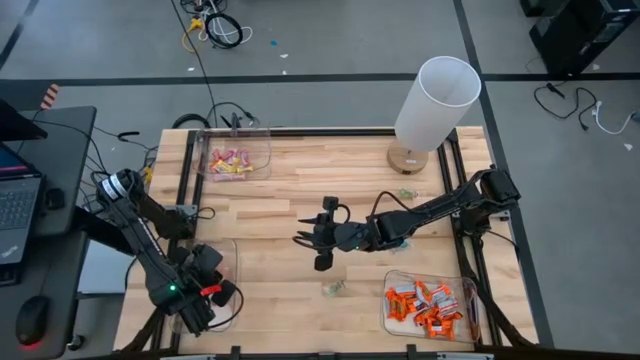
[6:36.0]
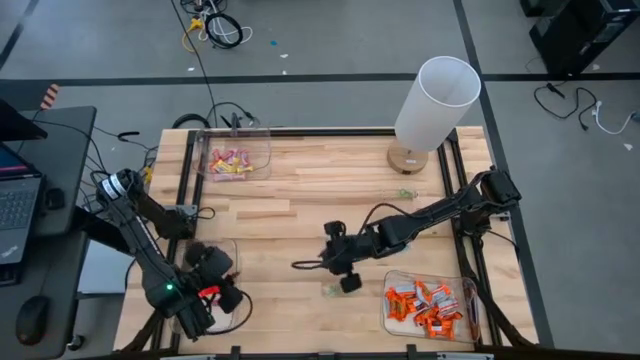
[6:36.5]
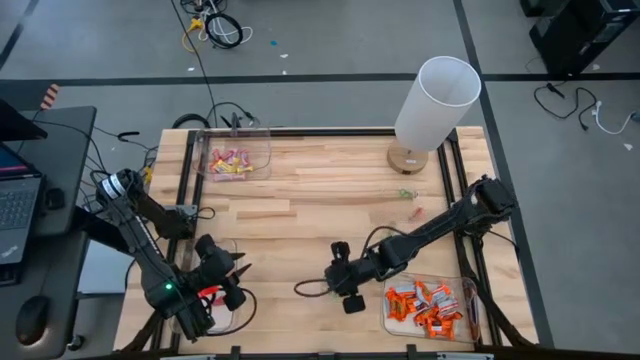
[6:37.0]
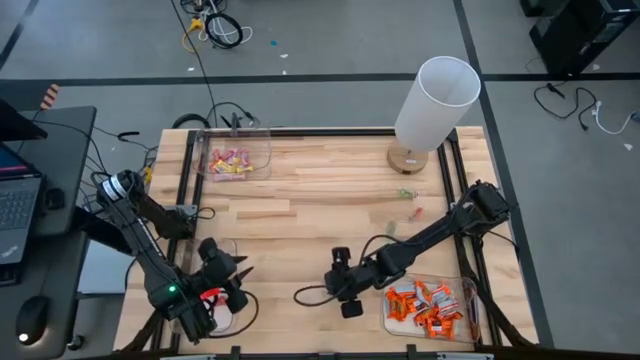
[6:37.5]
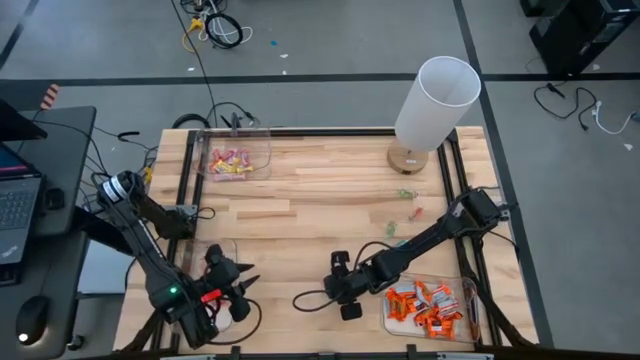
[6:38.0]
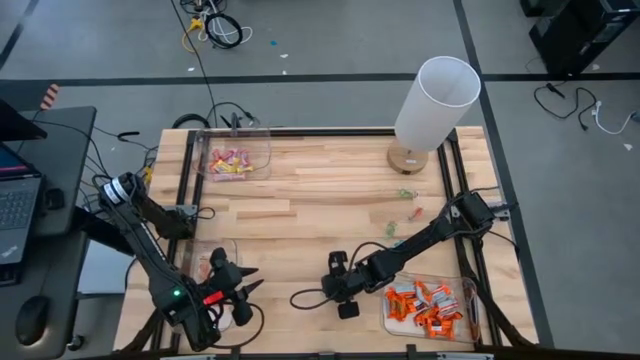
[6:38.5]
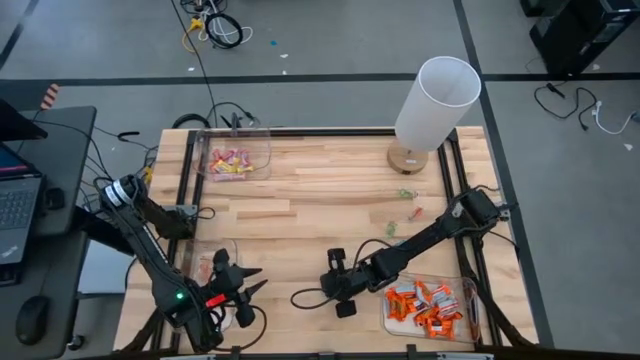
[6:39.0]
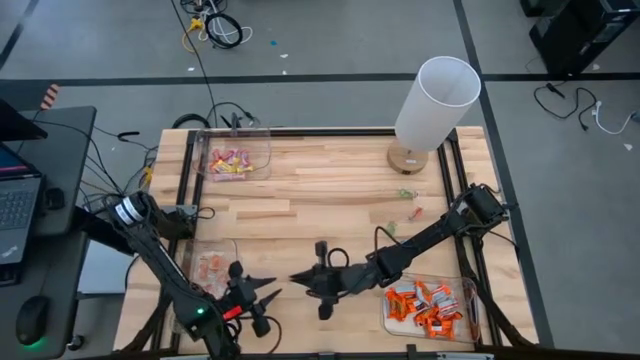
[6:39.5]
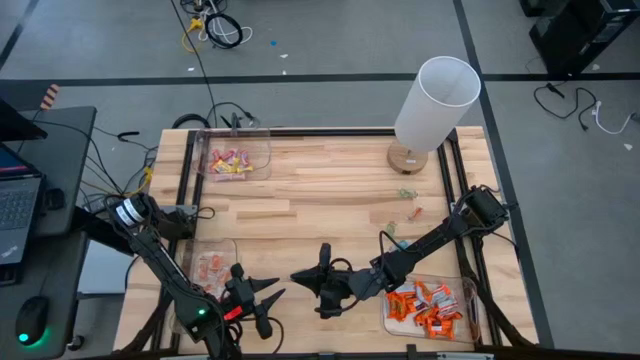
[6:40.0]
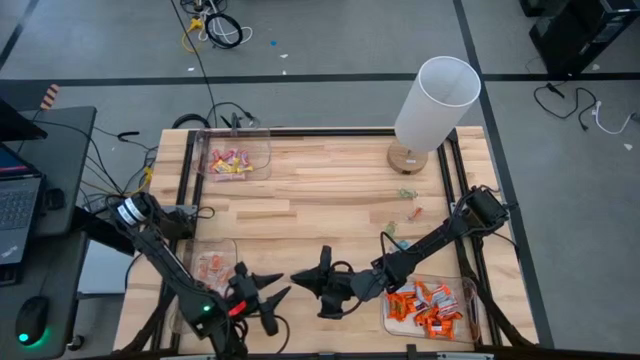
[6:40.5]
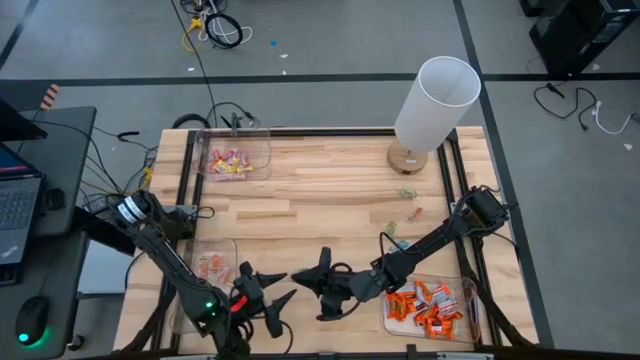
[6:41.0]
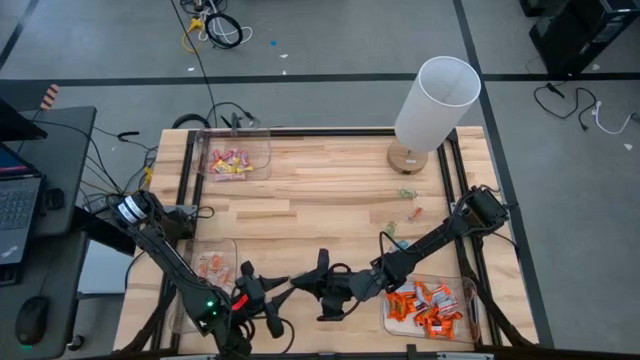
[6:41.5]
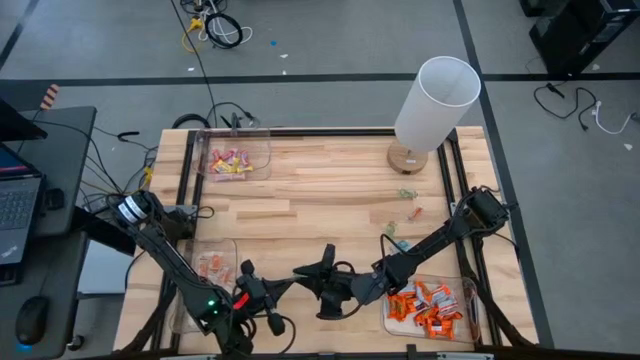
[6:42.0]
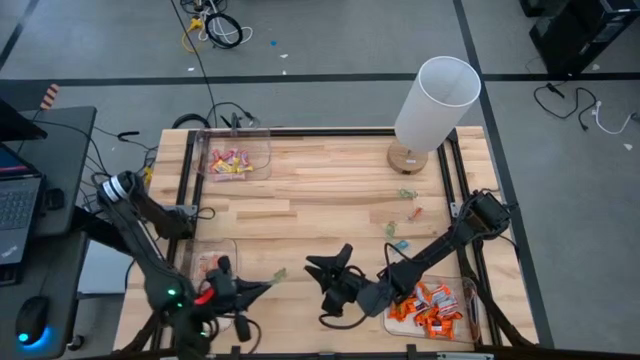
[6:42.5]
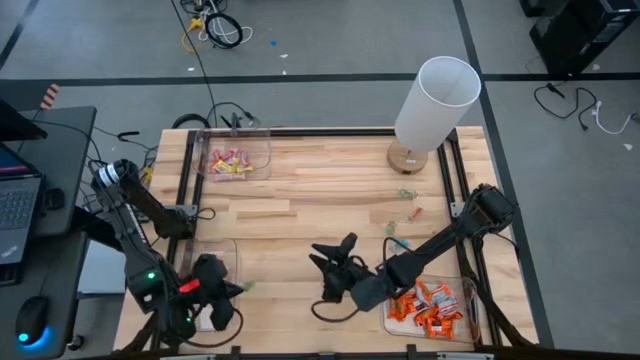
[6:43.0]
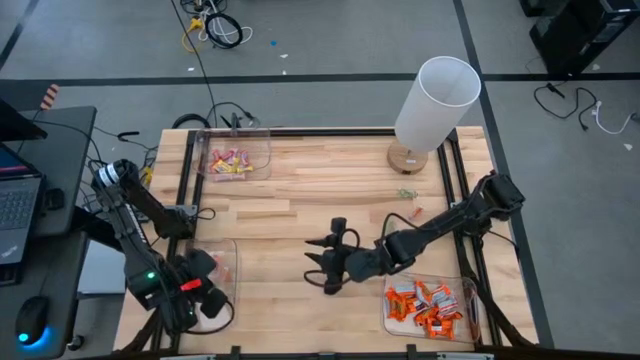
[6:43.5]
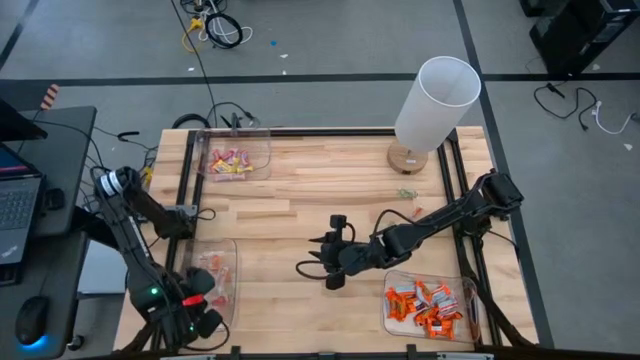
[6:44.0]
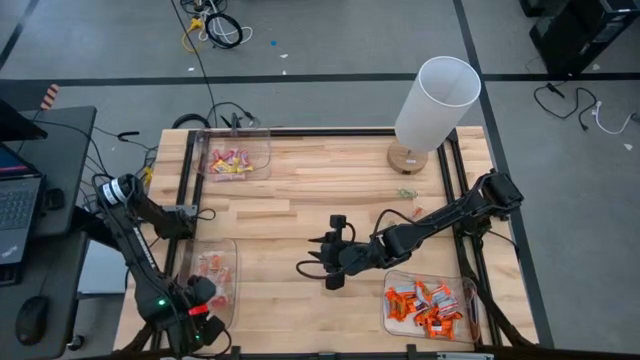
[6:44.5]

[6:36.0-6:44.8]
Task: Sort candy
Put the green gummy into the bottom left transparent bin

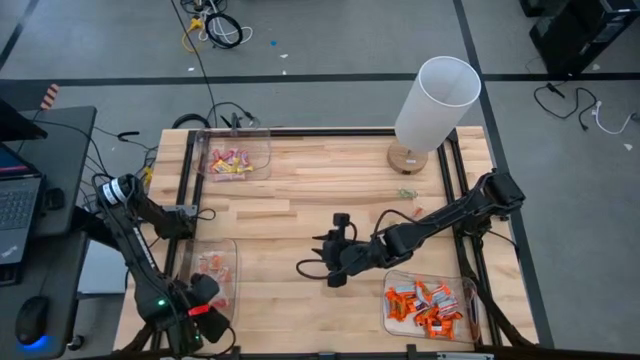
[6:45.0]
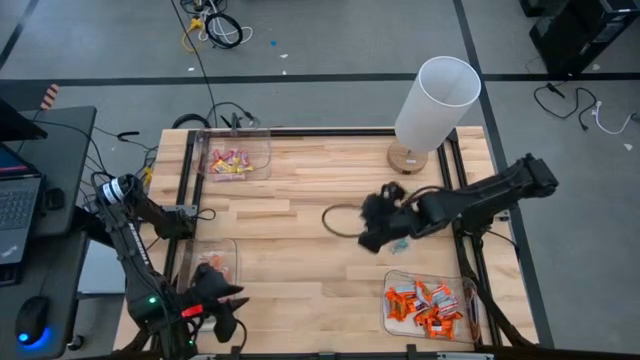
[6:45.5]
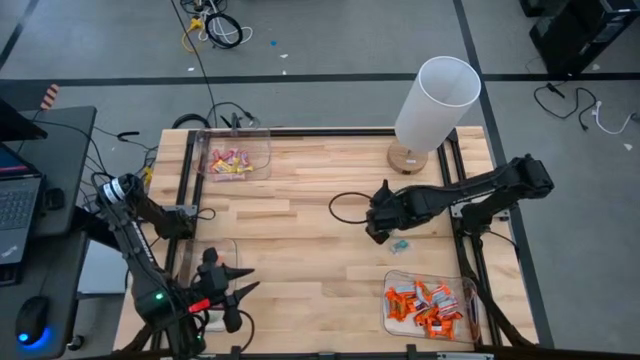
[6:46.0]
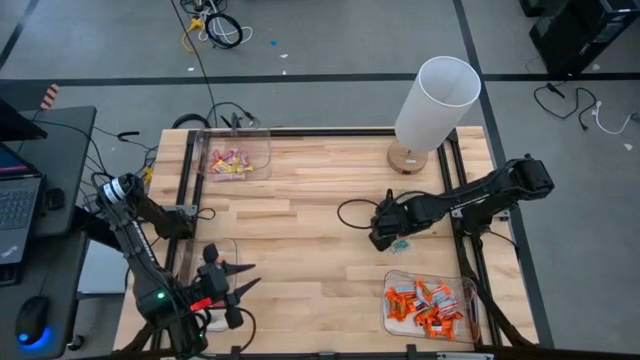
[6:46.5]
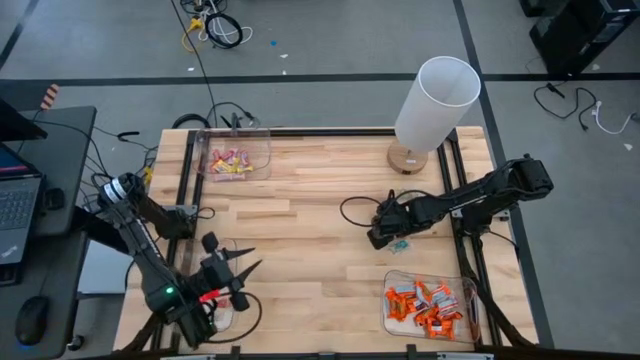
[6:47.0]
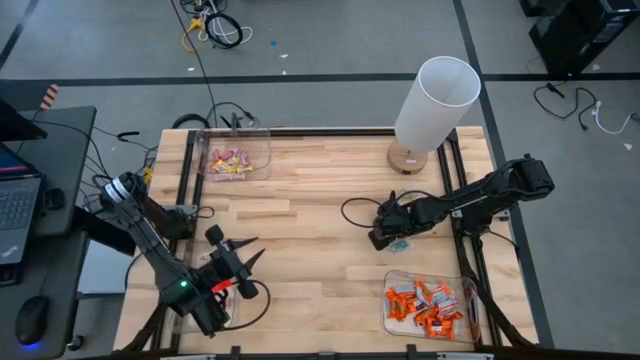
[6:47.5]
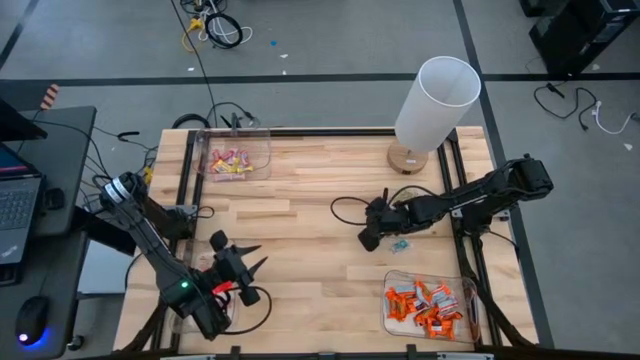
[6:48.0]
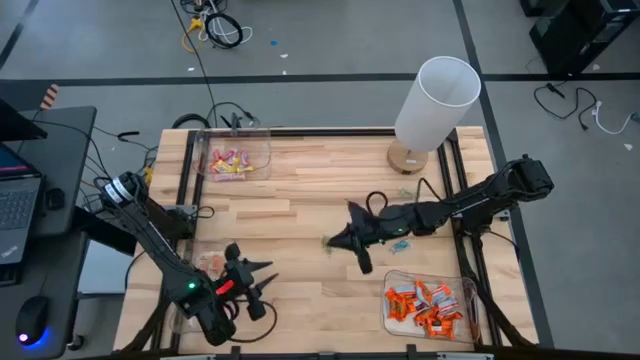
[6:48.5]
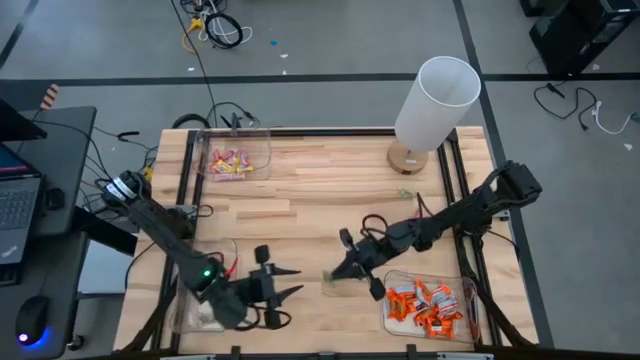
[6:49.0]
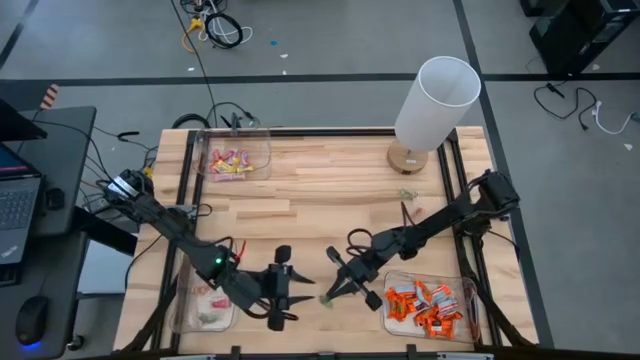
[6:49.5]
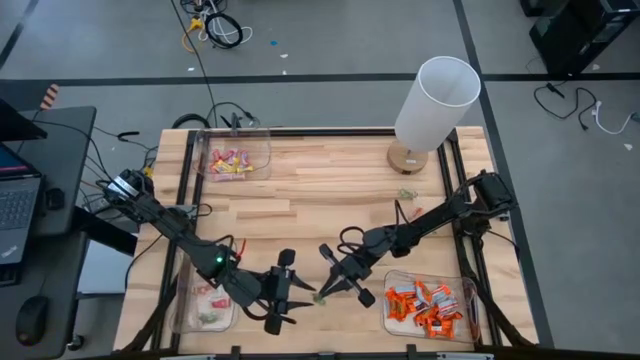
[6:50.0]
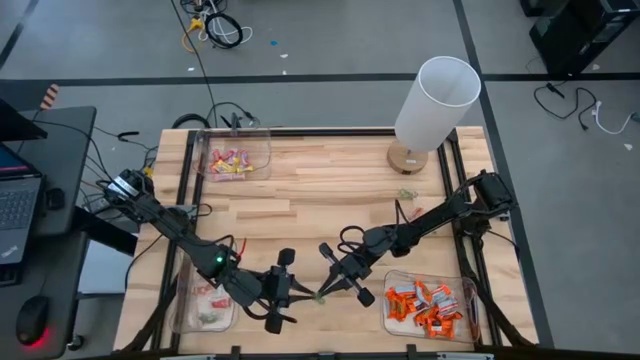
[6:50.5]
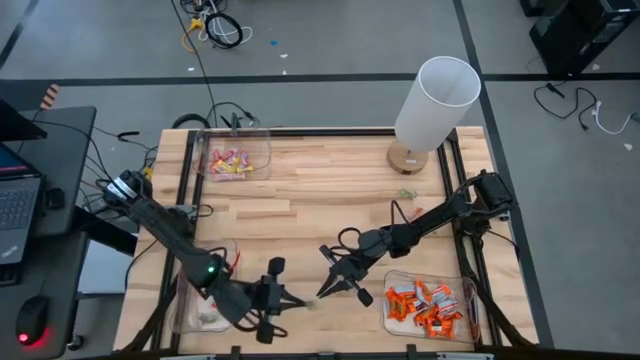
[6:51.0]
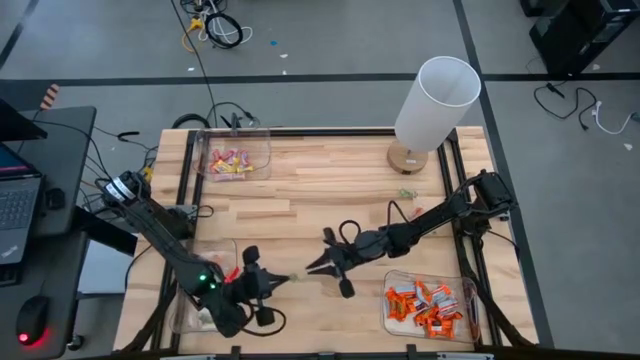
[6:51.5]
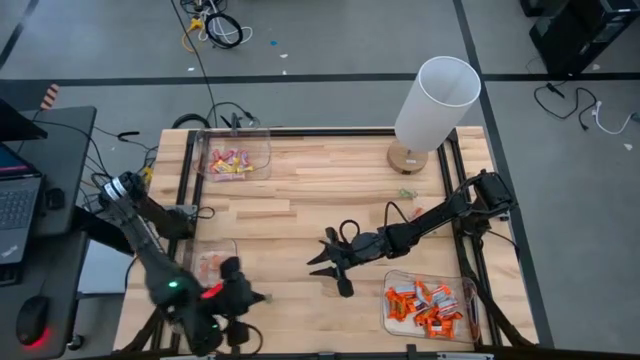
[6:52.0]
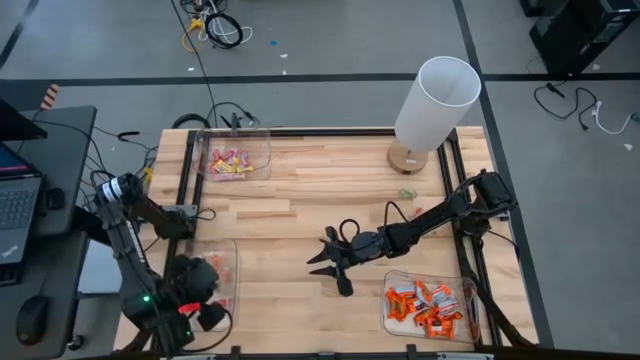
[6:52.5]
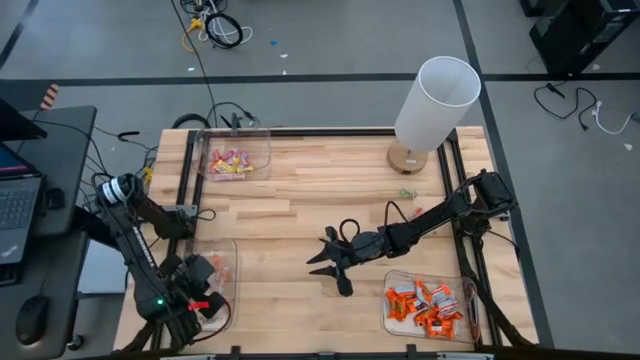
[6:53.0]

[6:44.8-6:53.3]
Put the green gummy into the bottom left transparent bin

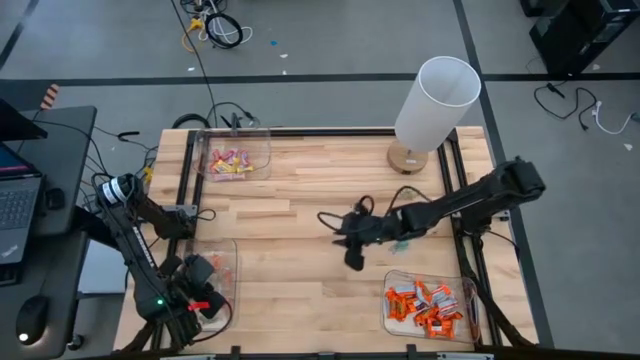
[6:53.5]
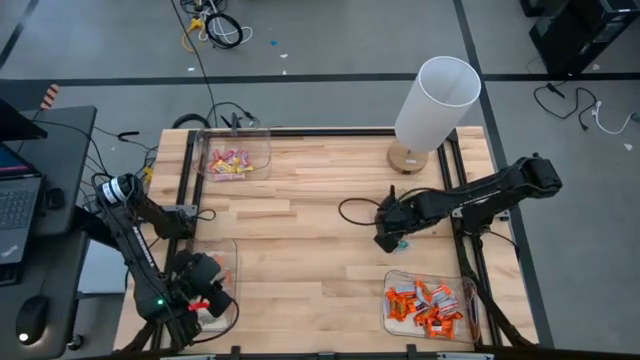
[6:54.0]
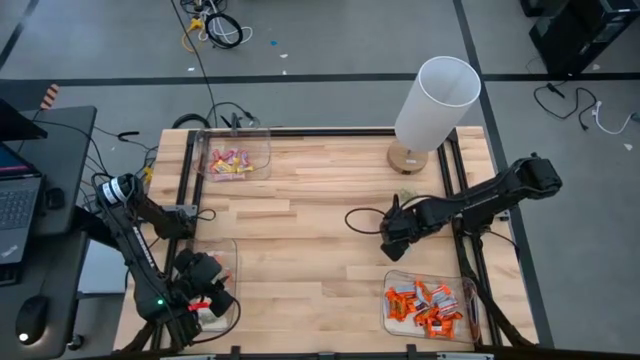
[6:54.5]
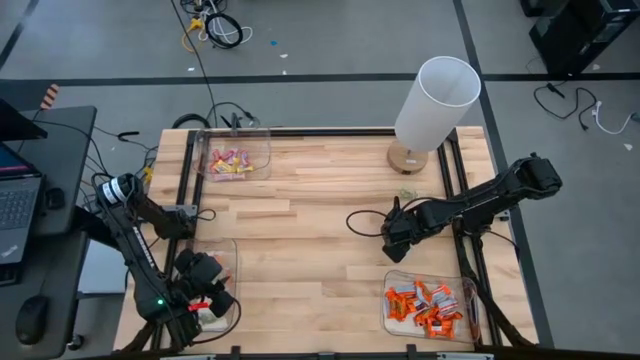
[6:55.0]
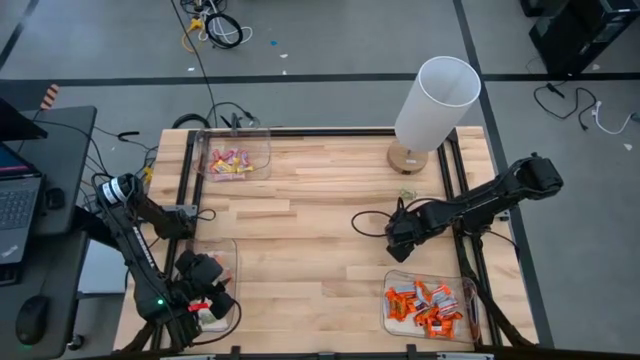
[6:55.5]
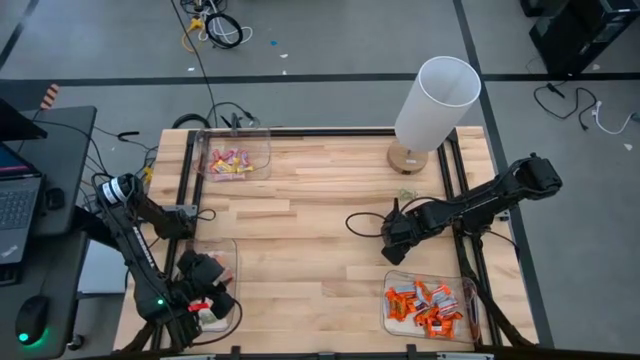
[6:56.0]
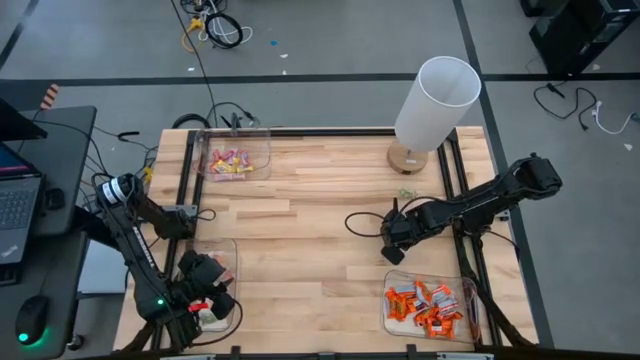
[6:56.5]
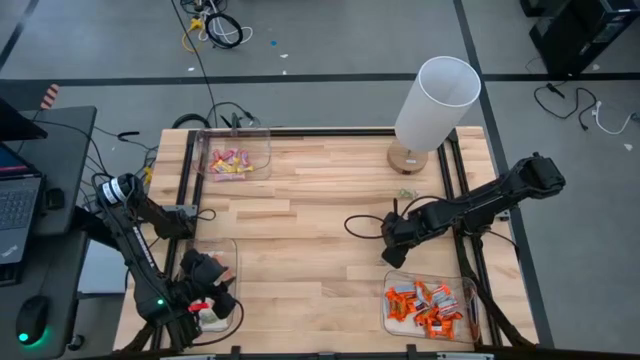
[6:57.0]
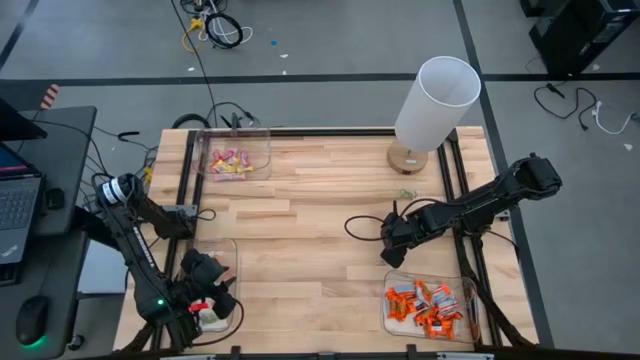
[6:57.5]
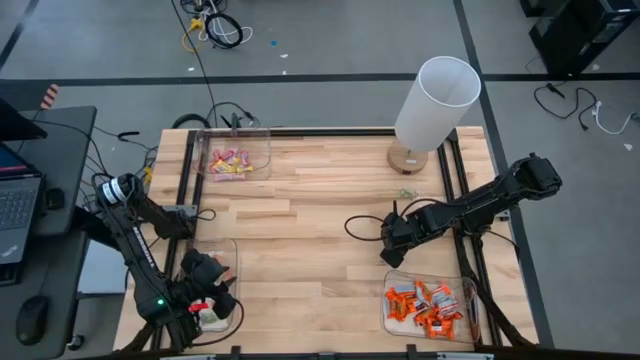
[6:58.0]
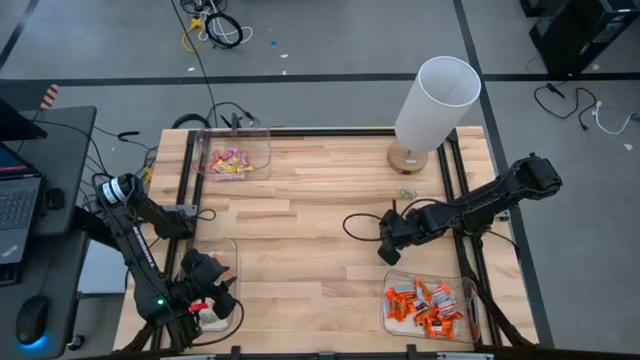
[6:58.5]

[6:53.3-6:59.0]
Put the blue gummy into the bottom left transparent bin

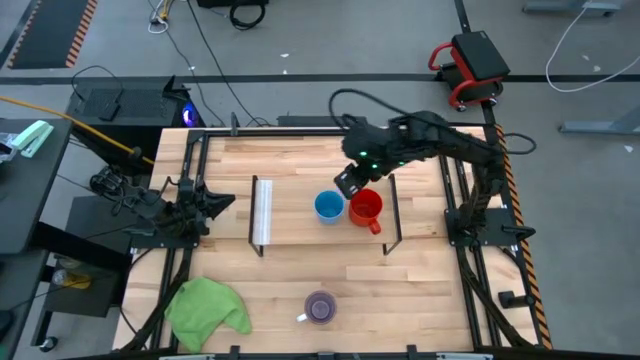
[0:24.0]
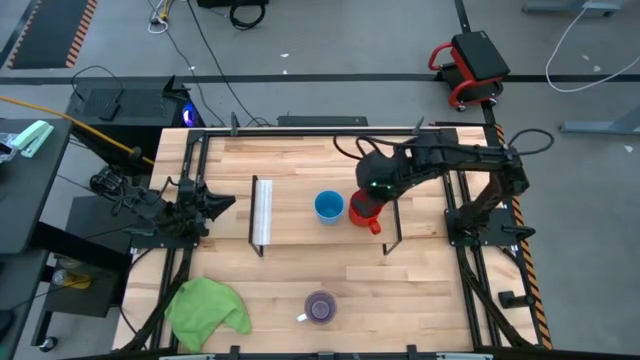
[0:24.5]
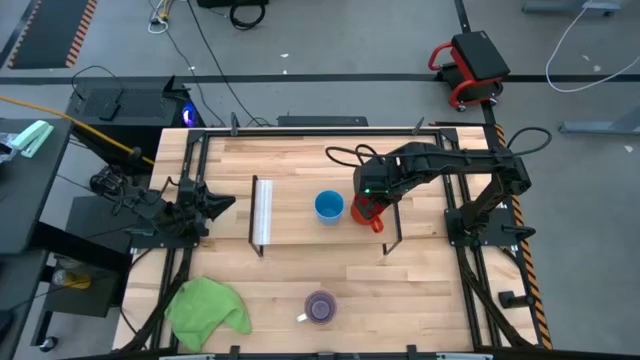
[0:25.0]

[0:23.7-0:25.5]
Task: Stack small to large cups/mugs on shelf
Adjust the red mug on the shelf
